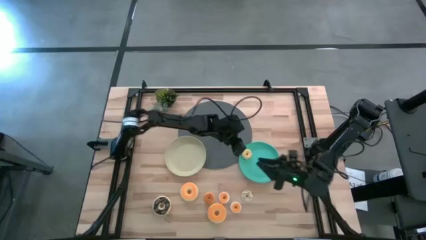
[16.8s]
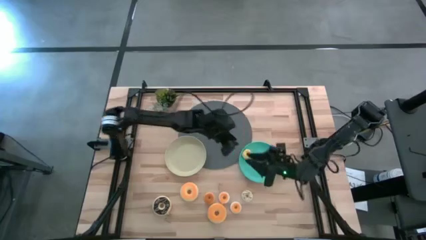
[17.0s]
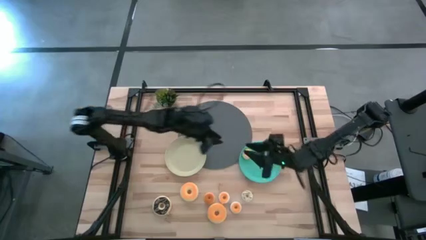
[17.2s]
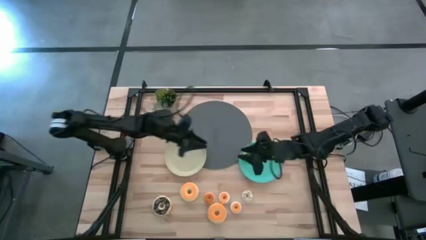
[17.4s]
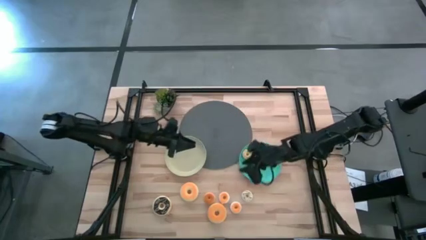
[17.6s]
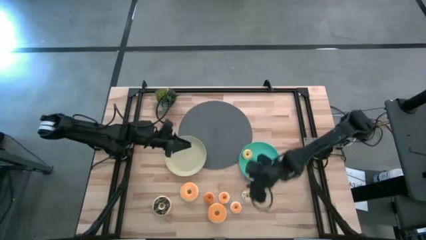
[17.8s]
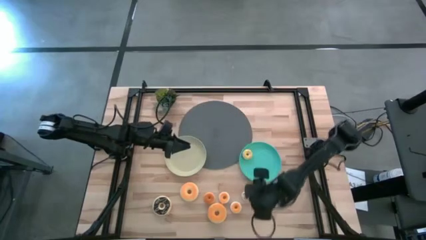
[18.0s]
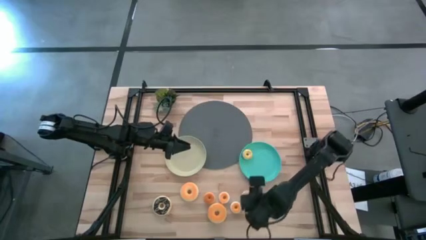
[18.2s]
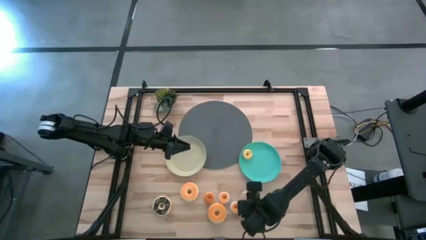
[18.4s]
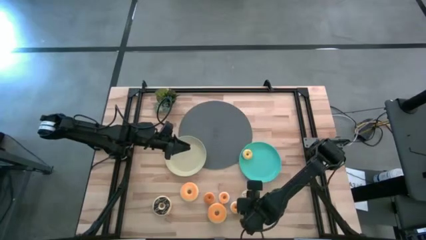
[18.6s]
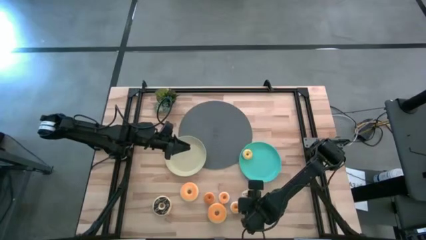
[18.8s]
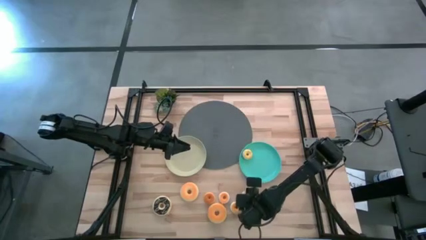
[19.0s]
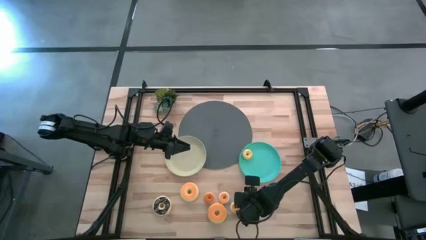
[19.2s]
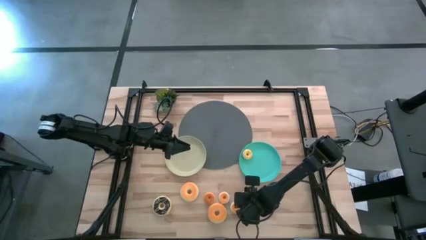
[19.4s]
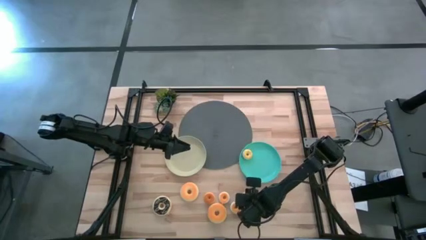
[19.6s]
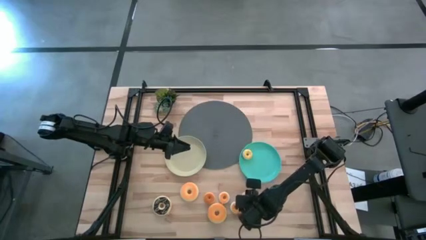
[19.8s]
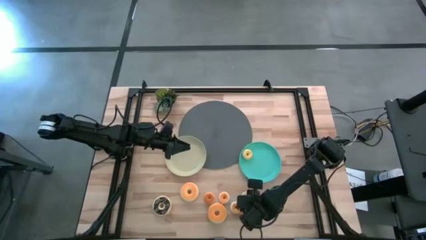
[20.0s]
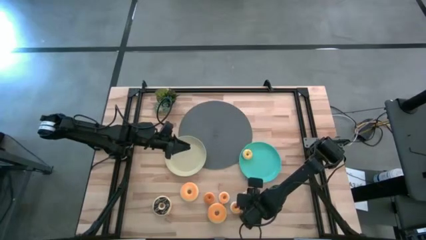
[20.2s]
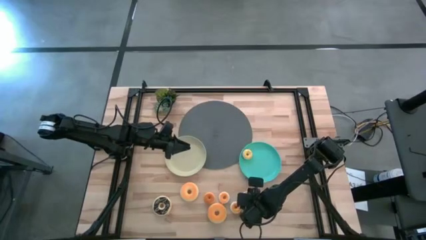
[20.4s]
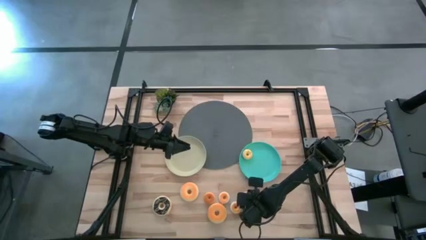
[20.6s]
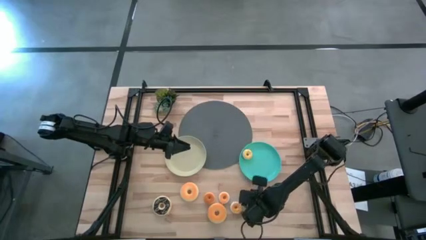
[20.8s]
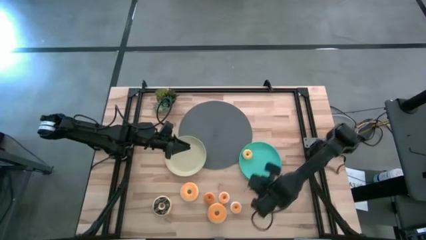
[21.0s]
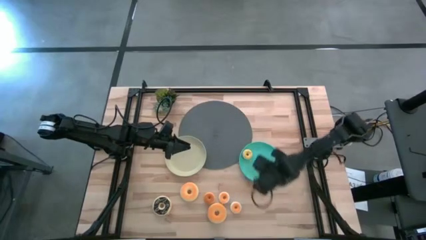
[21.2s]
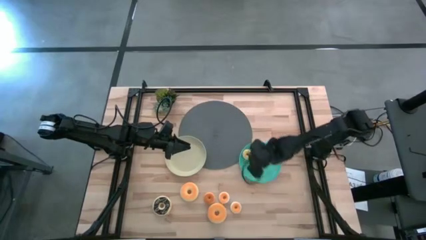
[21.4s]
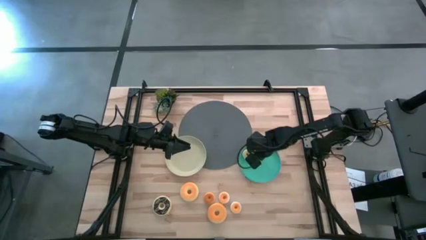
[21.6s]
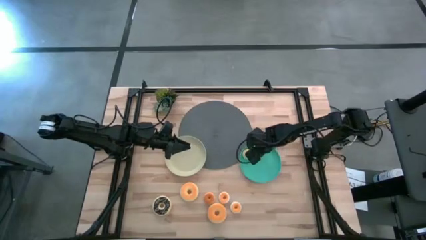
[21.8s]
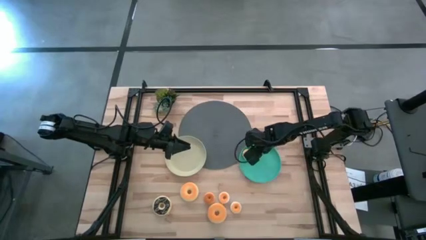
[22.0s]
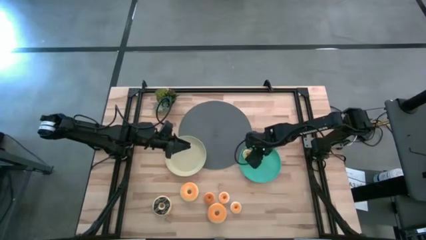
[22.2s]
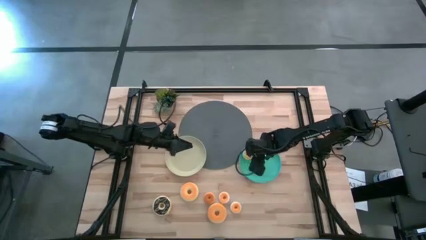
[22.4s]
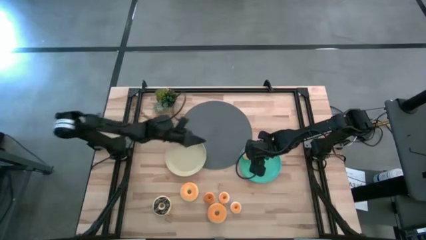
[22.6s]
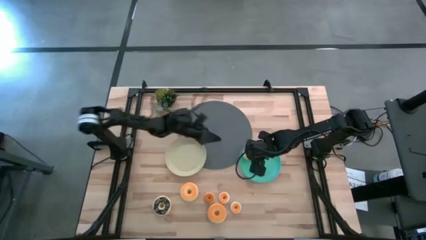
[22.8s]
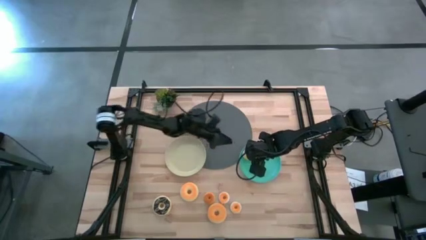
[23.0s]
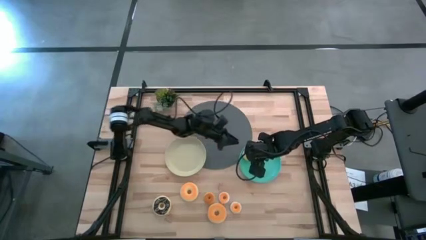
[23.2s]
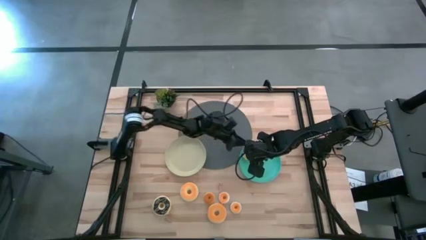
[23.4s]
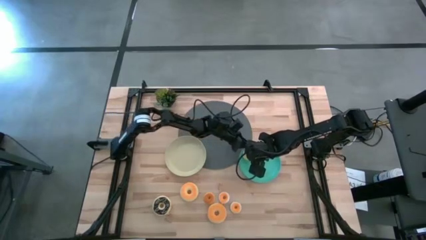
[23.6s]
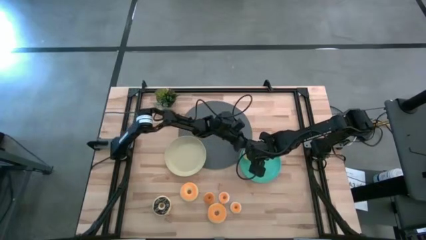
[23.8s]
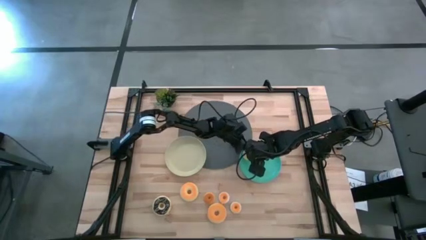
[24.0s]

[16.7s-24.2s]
Task: Pick & Place donuts
Put the small white donut on the green plate

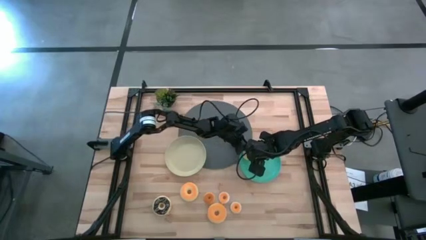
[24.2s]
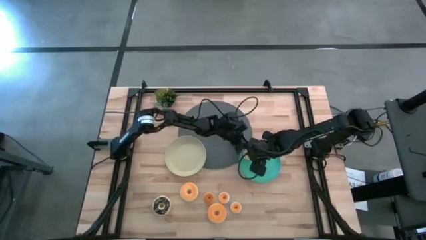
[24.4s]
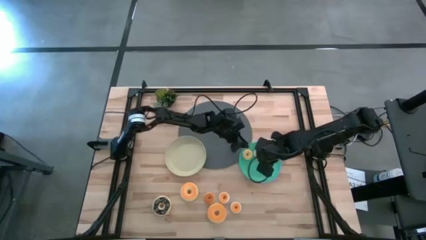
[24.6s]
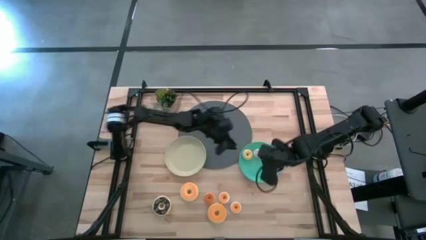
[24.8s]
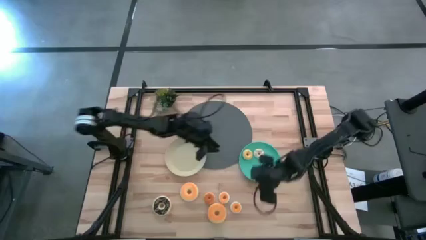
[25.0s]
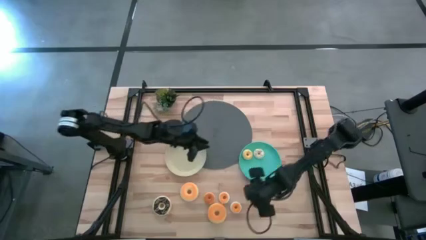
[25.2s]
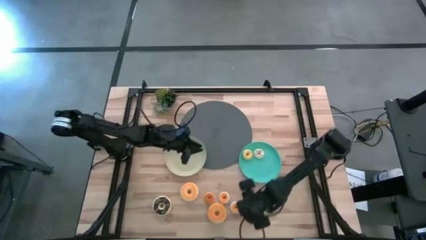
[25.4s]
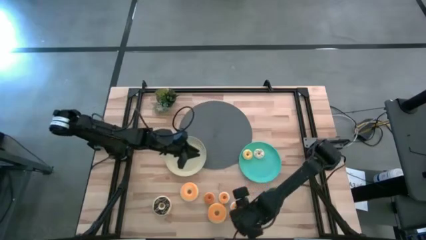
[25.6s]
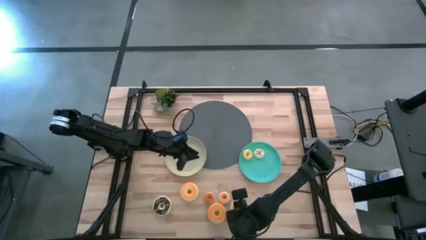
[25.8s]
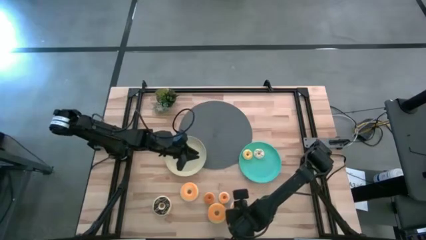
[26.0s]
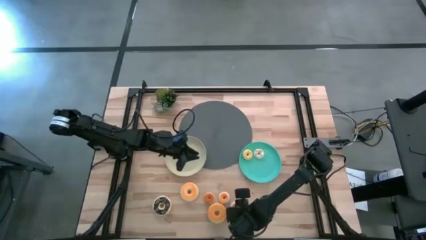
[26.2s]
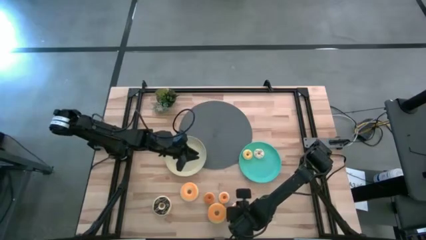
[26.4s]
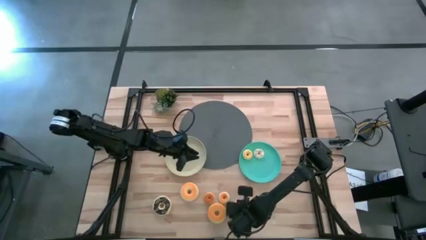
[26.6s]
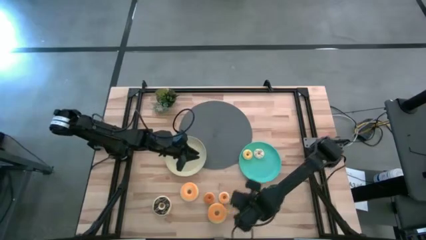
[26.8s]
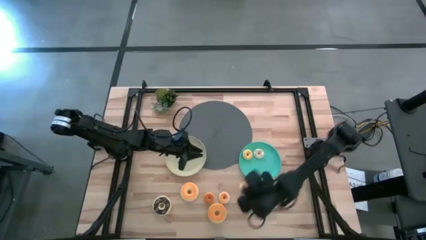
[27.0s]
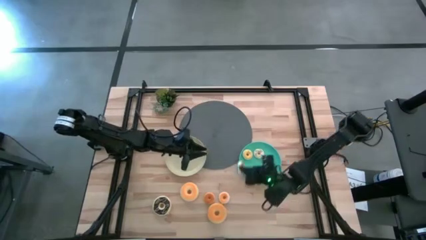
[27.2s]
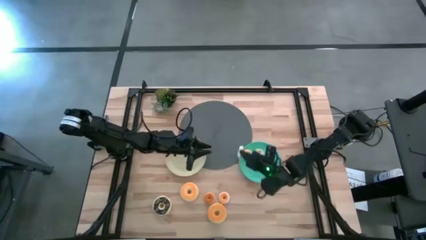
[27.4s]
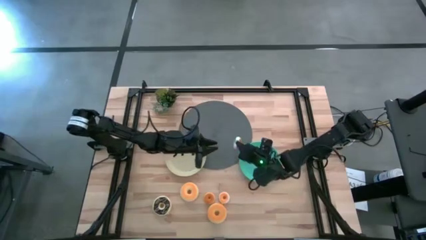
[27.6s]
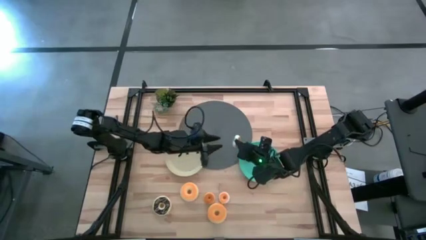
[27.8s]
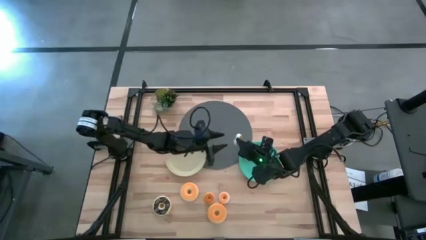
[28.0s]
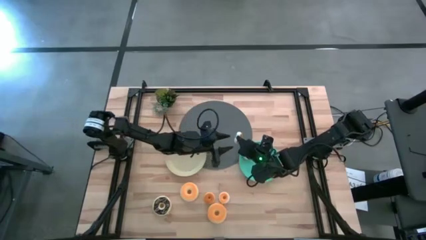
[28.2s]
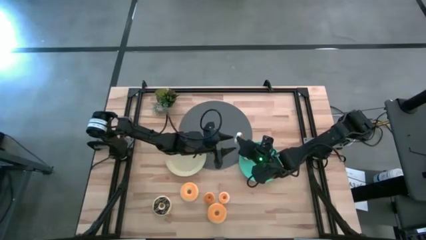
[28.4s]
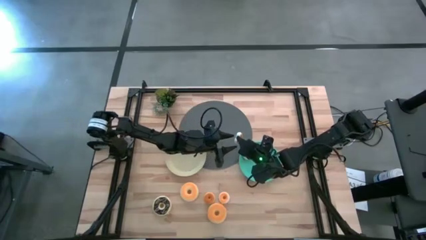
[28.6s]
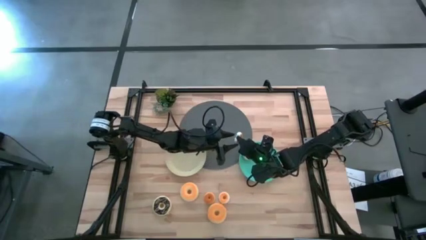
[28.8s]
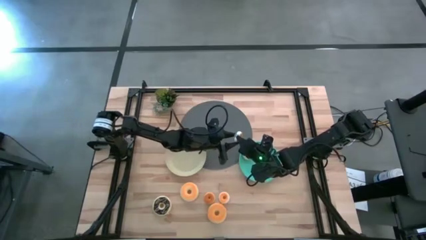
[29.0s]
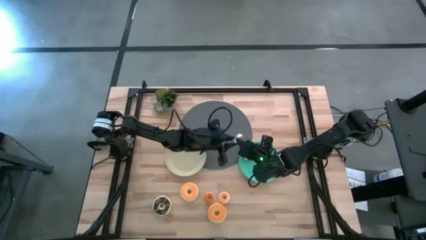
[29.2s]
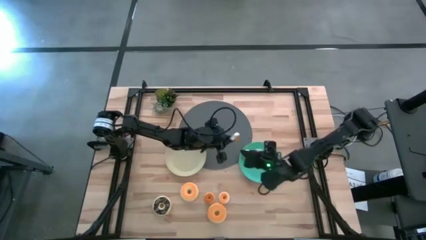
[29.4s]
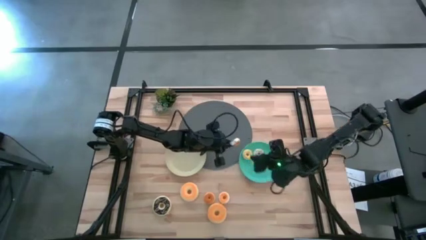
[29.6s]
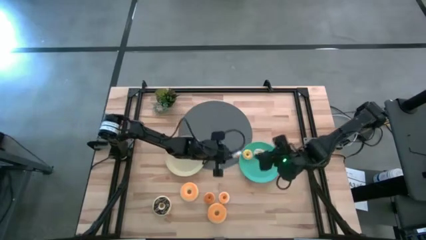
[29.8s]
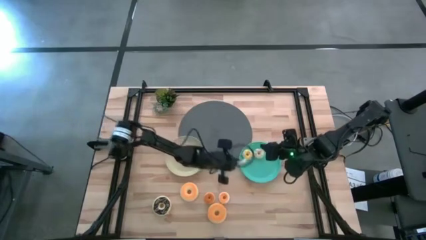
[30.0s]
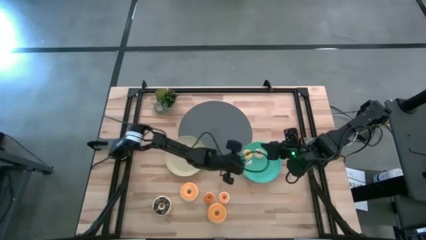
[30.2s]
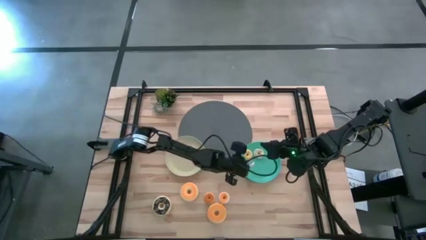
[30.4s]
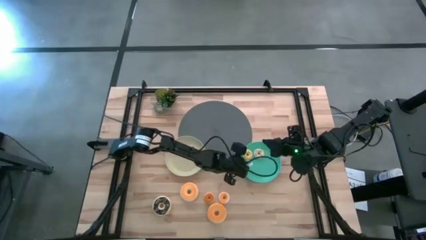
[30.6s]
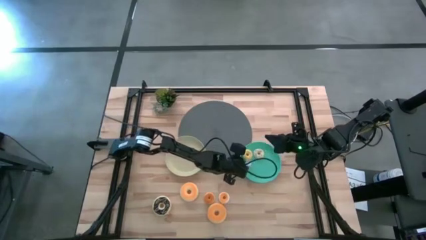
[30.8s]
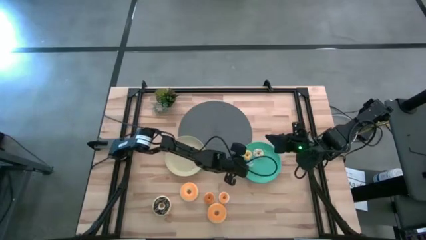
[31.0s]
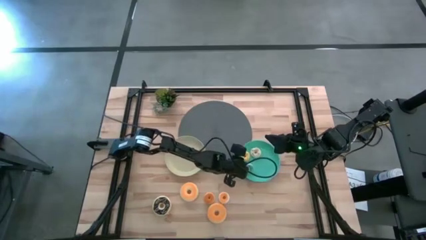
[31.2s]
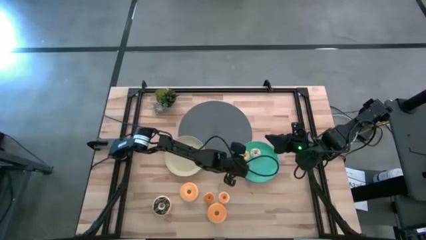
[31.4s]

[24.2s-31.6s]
Put the small blue donut on the green plate
